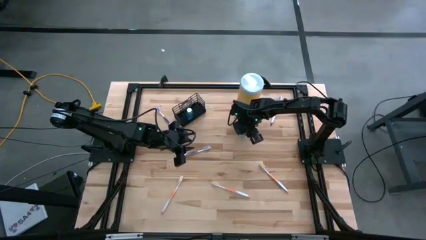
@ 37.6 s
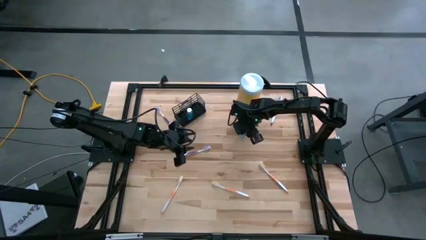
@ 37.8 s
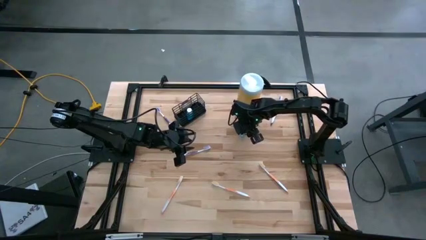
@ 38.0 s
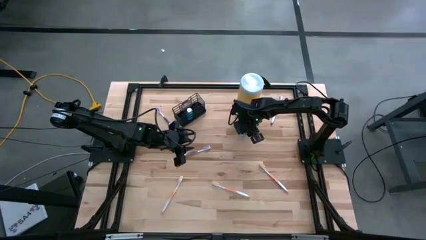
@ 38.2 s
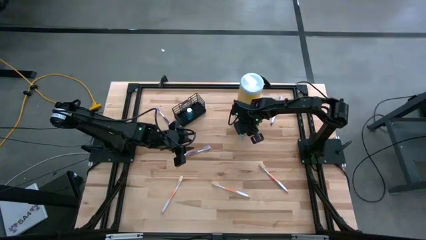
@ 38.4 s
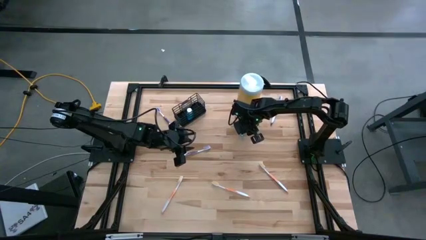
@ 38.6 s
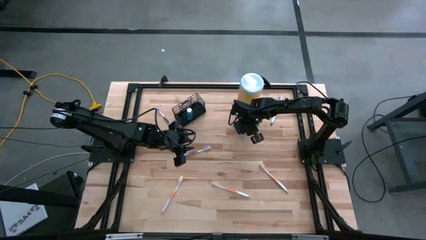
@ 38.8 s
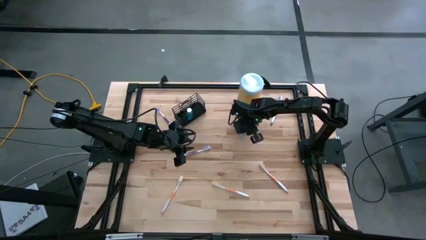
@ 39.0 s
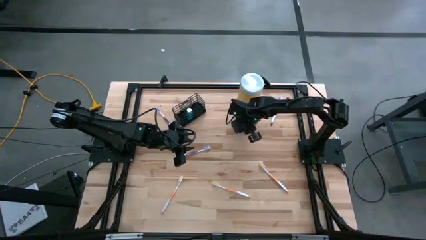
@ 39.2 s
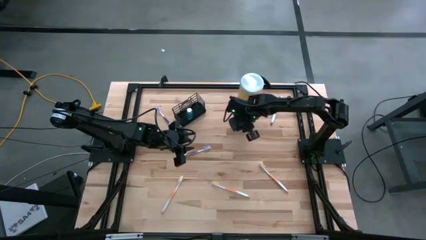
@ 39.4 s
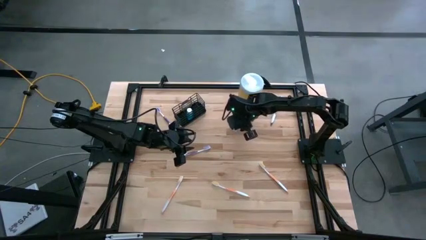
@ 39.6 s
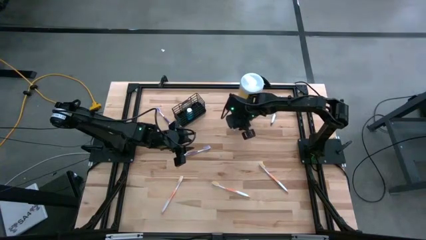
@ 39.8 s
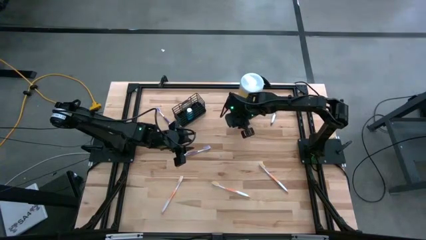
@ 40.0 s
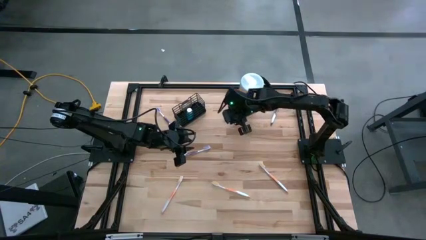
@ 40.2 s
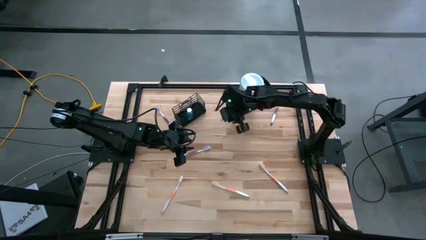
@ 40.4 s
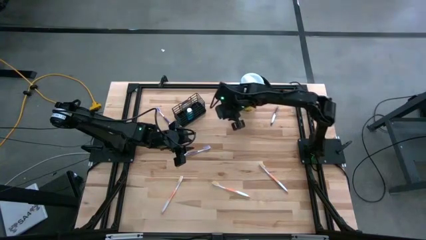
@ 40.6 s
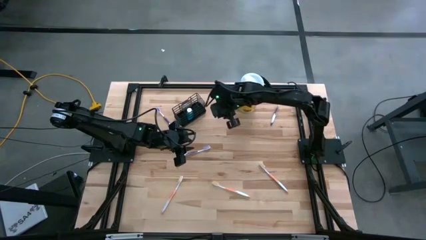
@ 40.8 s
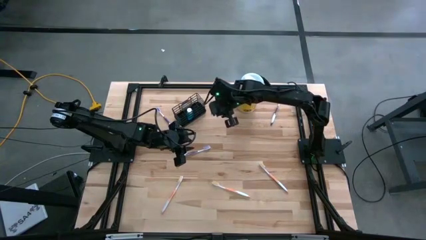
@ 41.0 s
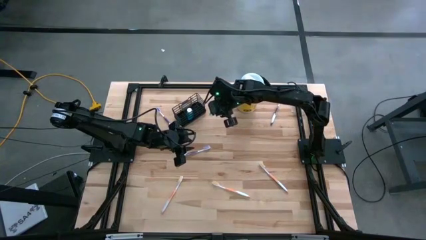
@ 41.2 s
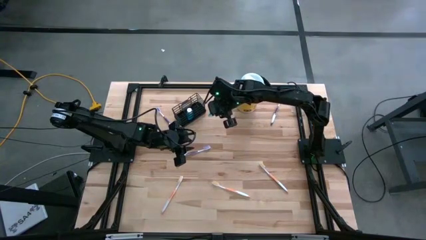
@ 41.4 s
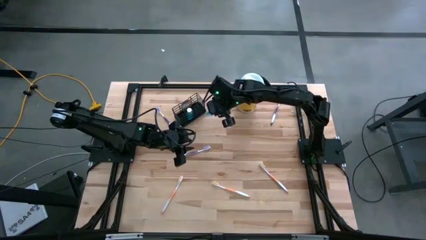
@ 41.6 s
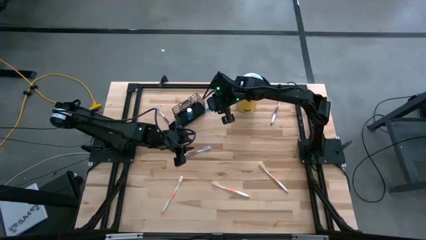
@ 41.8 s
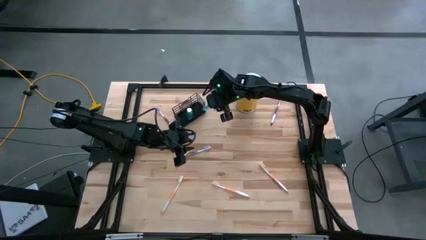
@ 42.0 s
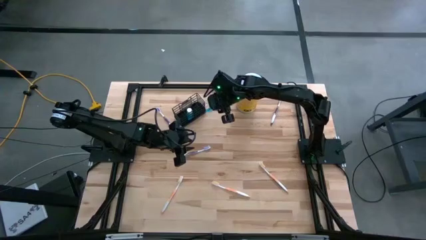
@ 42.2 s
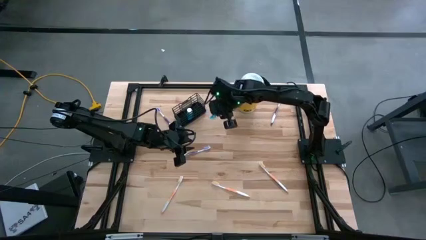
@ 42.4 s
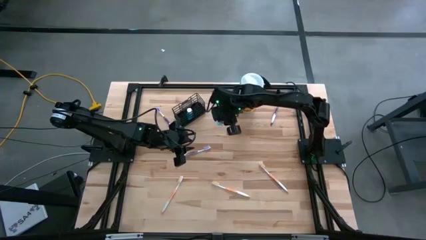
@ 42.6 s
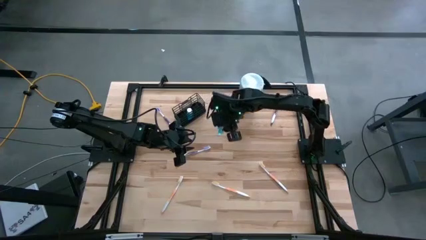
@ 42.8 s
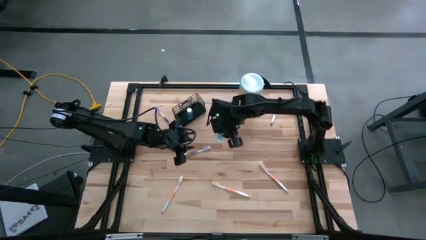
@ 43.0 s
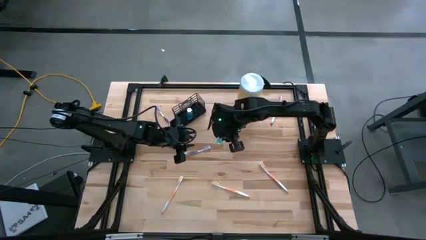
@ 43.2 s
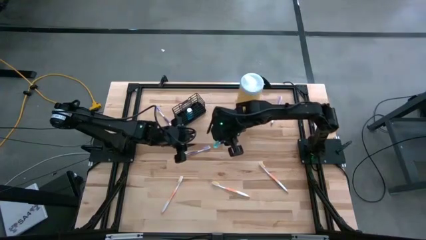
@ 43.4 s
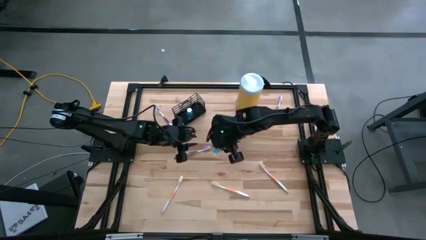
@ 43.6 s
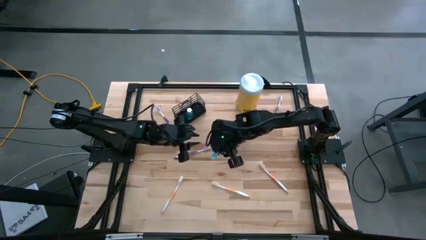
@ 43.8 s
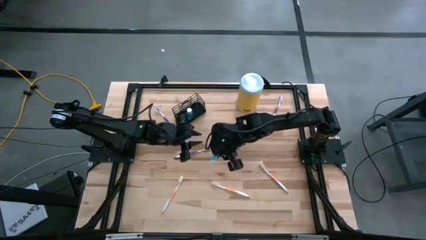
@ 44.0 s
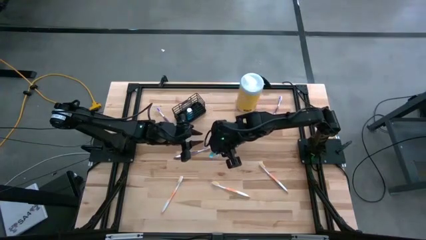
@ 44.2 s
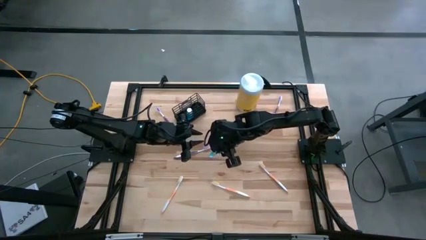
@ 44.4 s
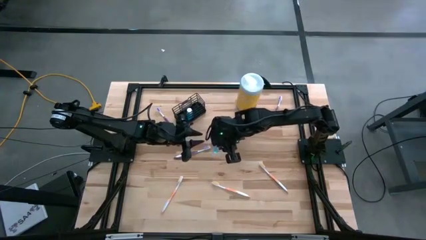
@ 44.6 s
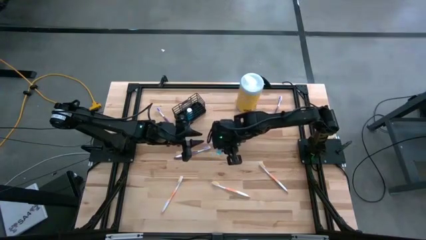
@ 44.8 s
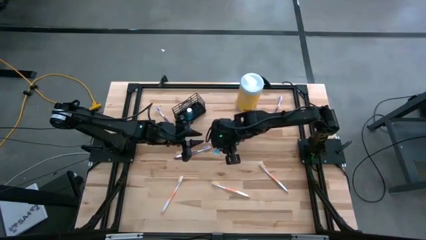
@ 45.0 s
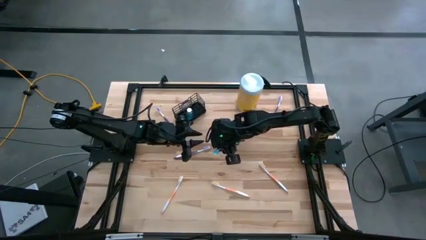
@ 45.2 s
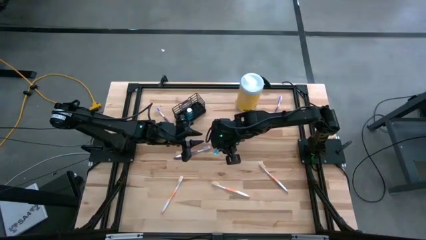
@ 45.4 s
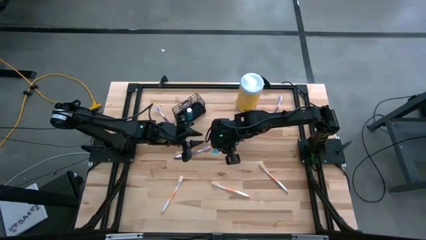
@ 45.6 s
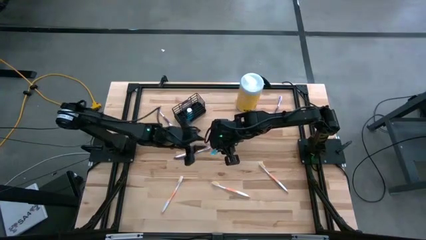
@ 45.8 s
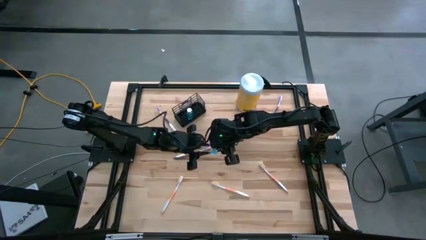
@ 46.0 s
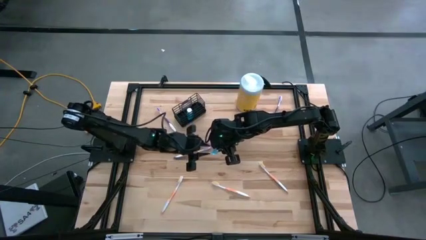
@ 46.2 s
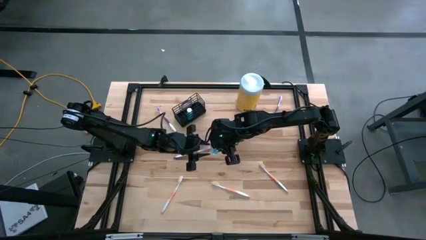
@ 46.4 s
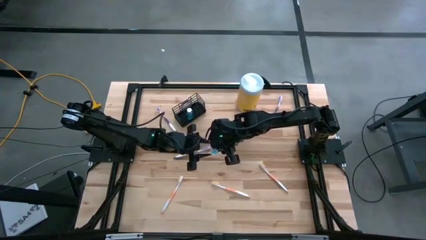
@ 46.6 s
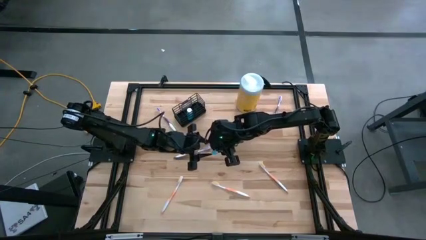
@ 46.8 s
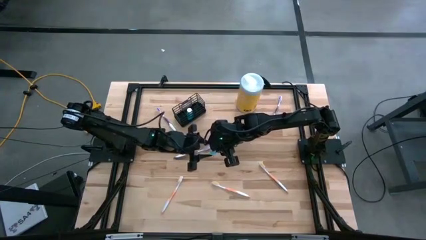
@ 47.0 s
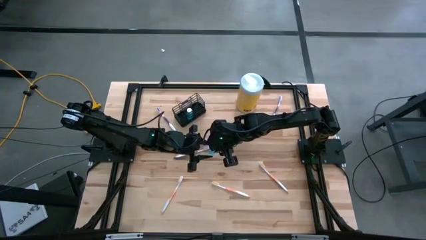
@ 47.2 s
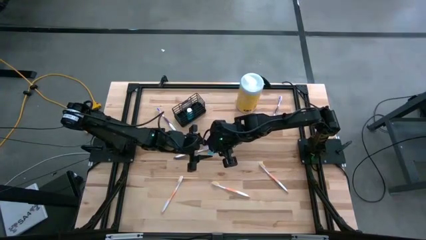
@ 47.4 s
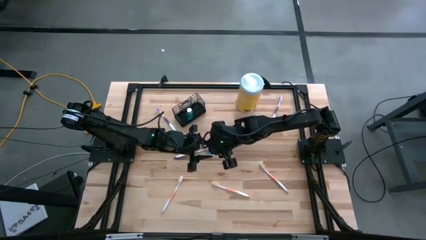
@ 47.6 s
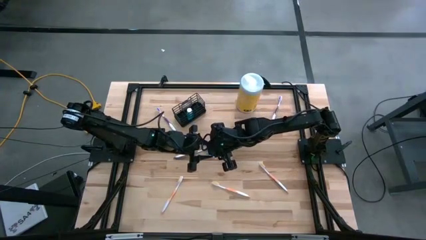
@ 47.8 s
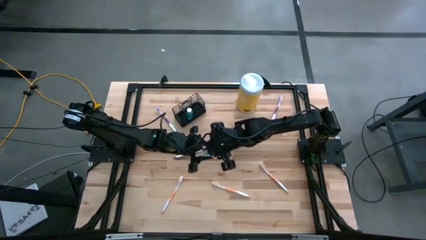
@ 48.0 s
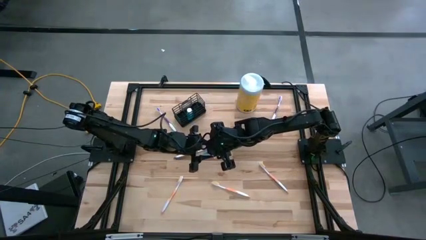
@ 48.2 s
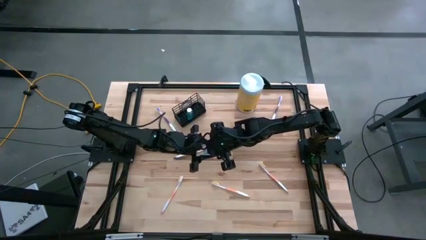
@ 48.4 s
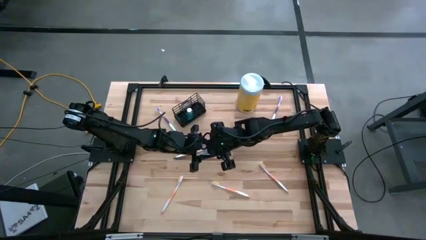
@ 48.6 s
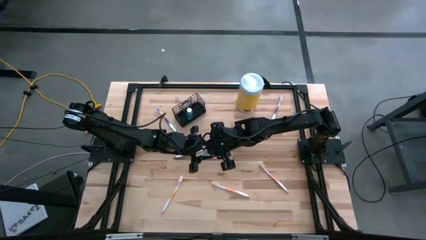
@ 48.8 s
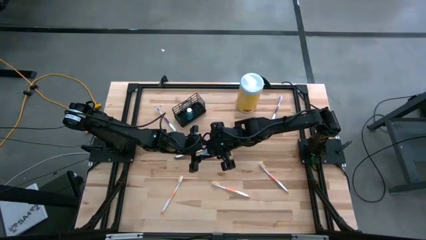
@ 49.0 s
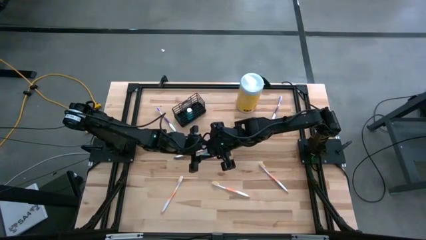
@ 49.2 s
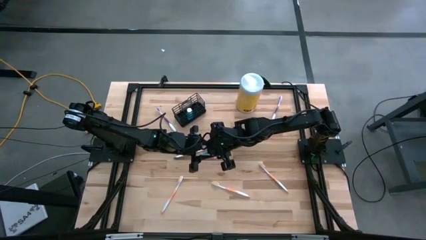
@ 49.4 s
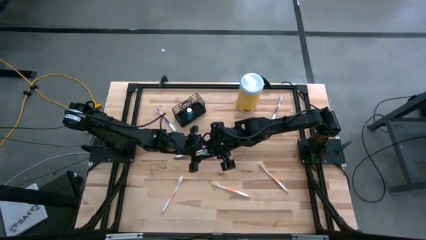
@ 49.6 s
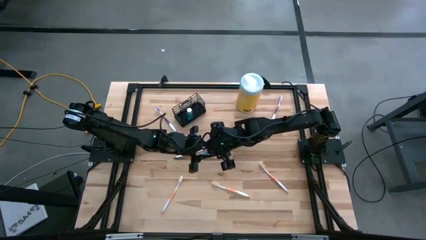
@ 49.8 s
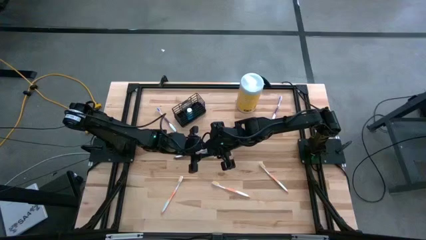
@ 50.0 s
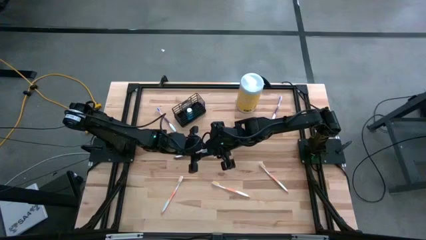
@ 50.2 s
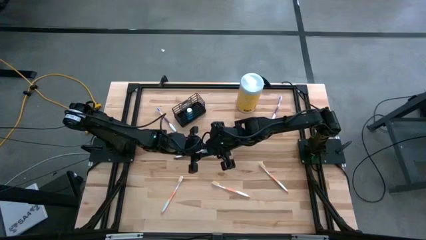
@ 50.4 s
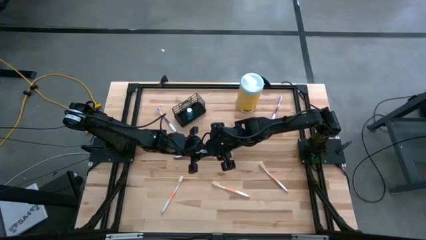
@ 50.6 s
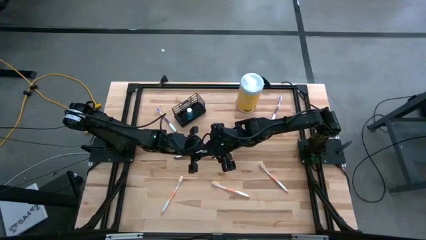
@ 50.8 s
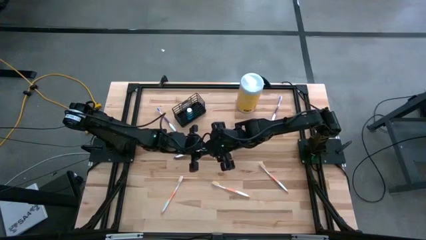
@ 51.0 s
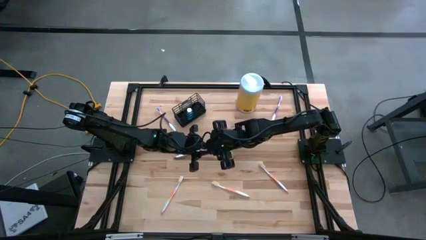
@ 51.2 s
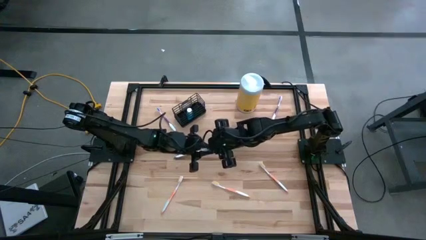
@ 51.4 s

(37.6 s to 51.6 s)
Task: Pick & Place toothbrushing station
Put the mouthwash into the middle section of the wire organizer
